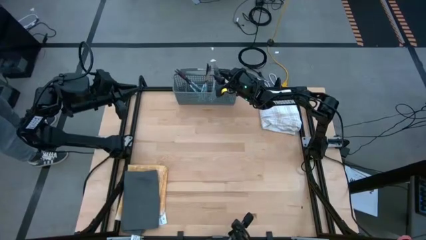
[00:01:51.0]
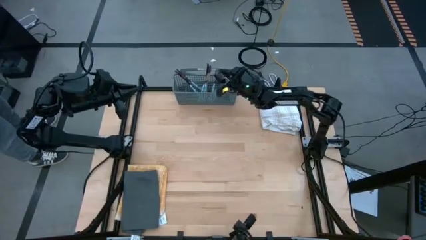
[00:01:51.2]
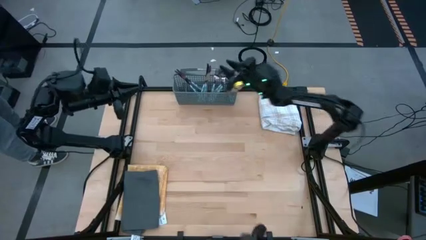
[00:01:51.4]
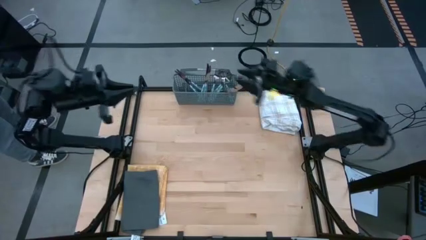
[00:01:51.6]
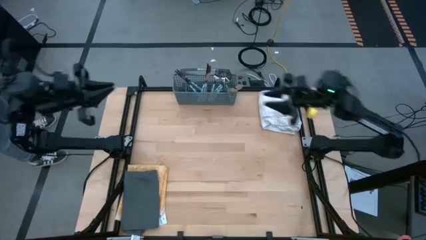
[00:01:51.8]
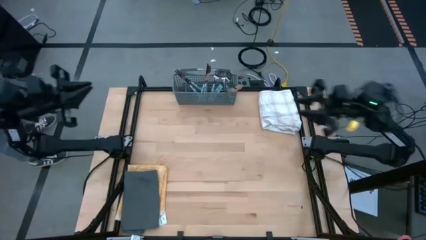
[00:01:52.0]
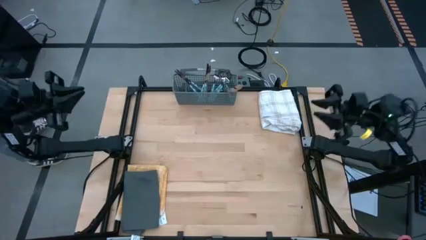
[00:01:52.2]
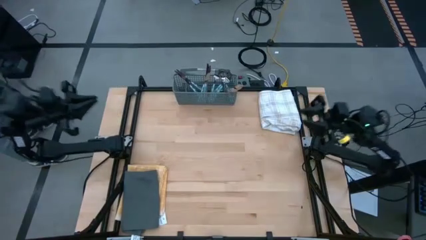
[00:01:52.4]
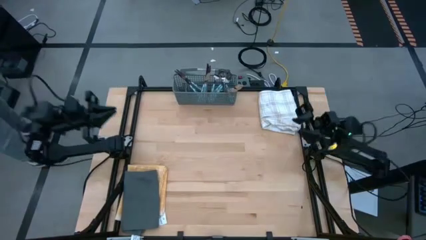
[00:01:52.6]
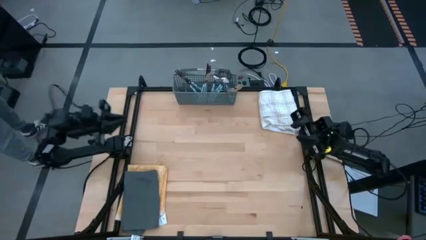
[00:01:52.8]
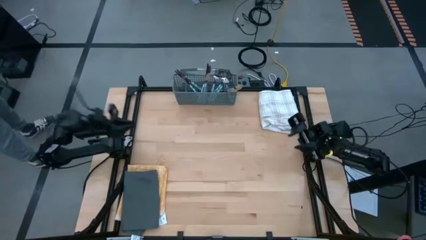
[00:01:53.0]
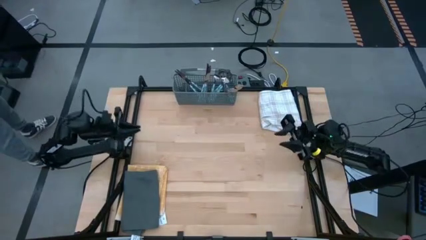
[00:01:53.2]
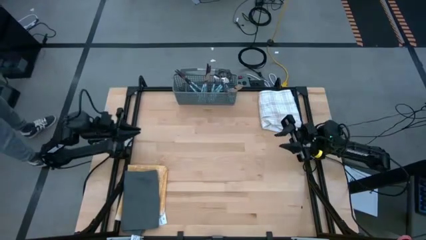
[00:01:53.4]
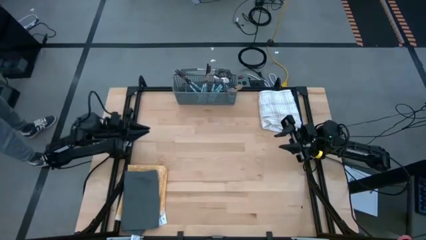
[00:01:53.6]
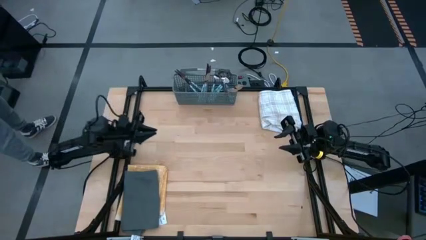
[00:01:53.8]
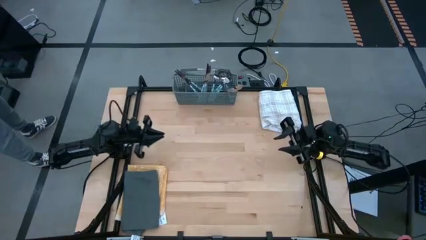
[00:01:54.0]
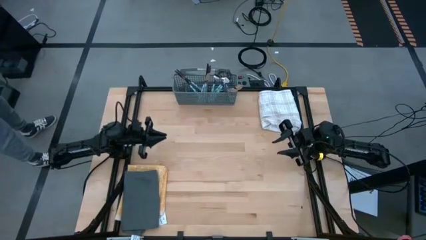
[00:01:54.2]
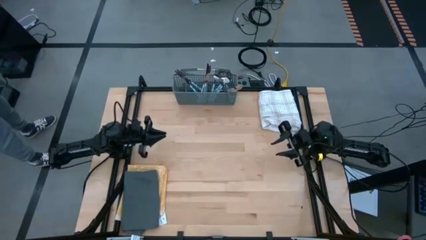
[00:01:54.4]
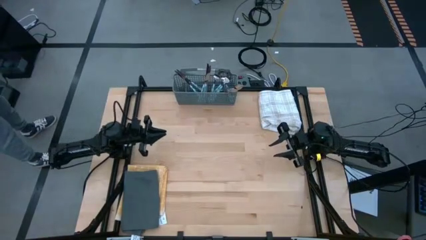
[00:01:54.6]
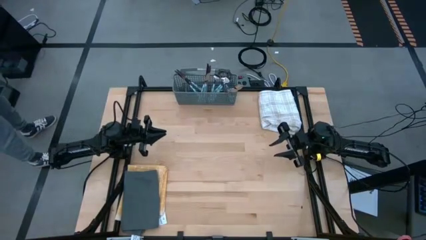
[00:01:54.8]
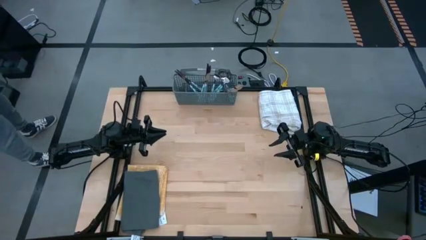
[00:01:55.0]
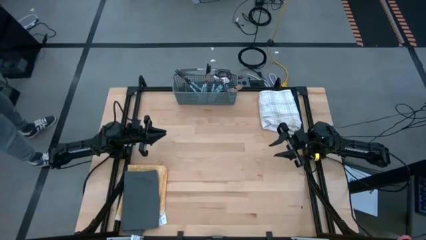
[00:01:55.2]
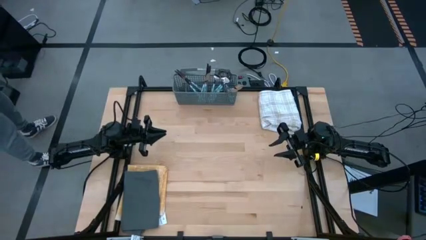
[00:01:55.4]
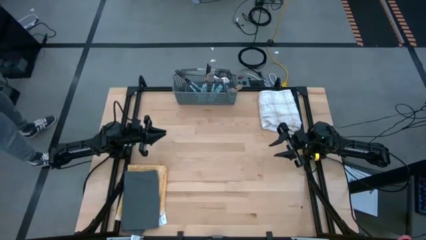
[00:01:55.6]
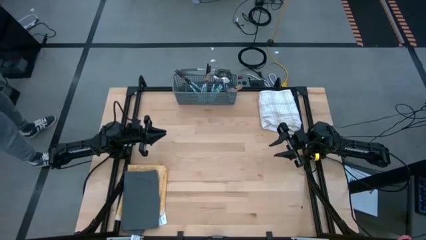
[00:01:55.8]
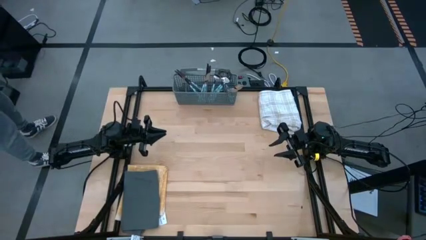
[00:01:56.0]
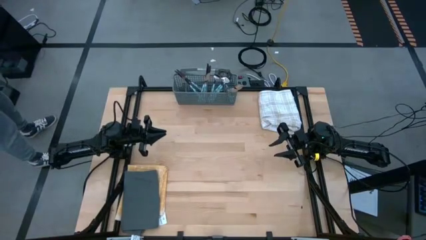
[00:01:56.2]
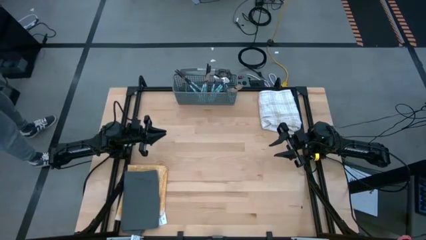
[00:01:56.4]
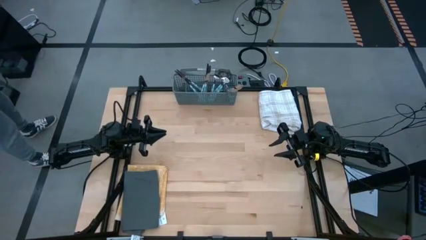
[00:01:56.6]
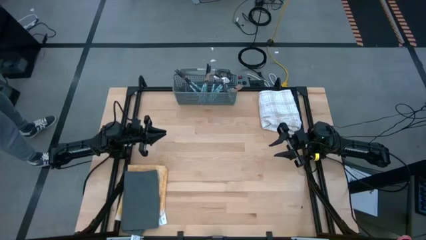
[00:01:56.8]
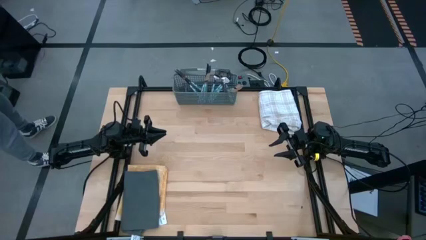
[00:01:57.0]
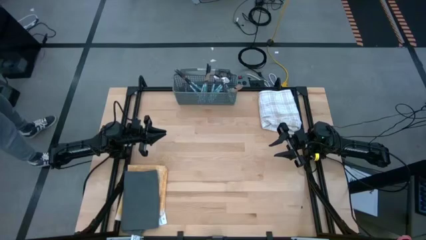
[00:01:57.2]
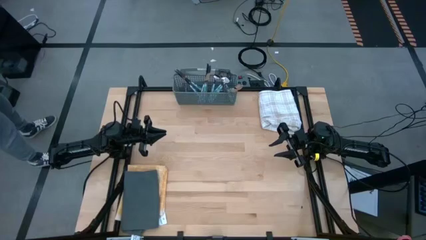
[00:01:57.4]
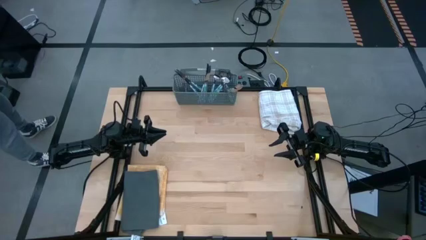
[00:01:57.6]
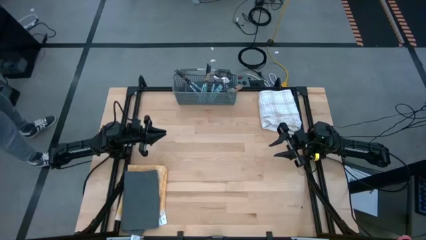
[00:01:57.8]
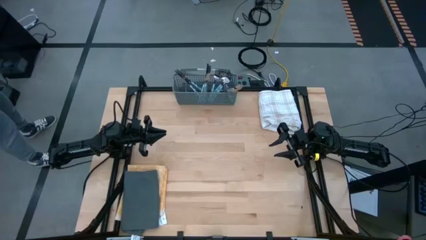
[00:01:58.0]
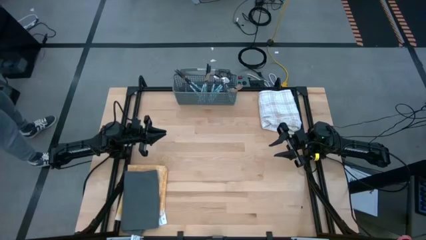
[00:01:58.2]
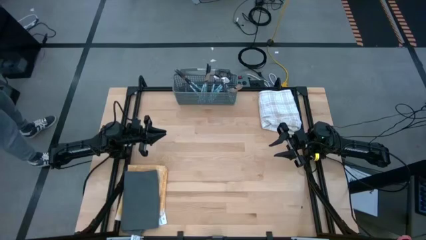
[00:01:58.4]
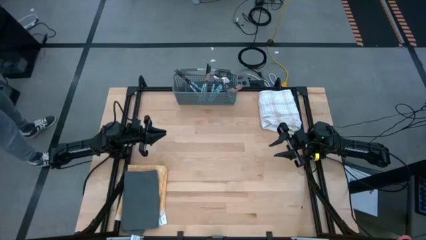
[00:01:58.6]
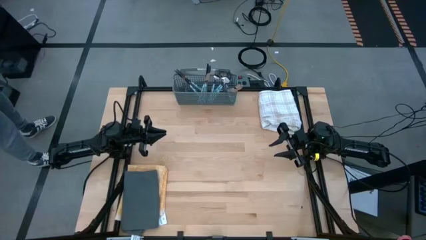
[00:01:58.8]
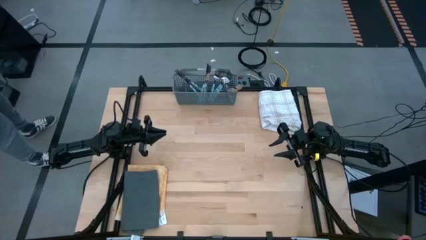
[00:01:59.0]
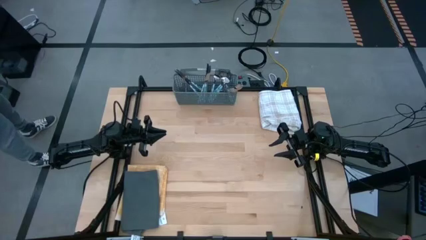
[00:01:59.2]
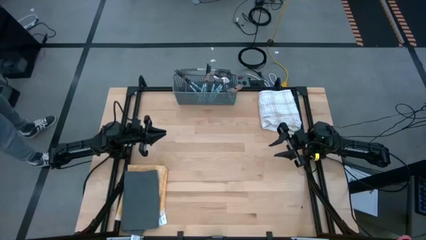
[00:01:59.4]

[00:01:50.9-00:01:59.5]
Task: Sort silverware
Return to Home Position
